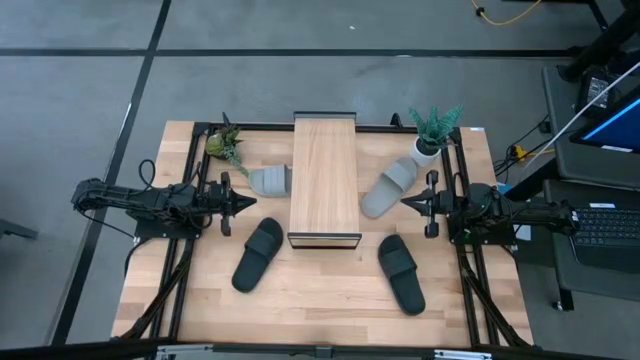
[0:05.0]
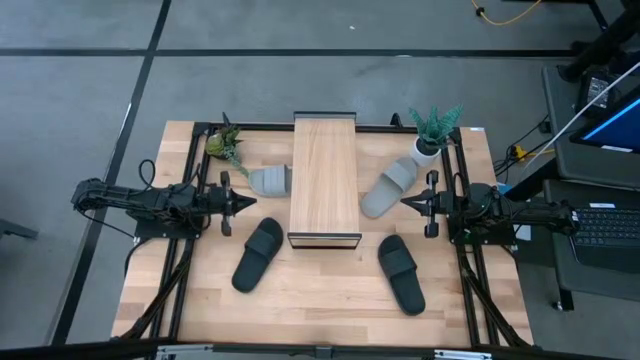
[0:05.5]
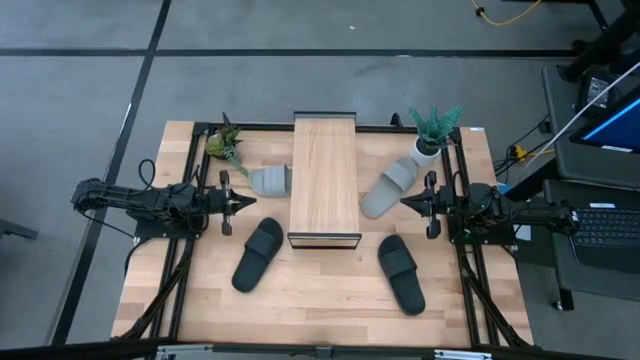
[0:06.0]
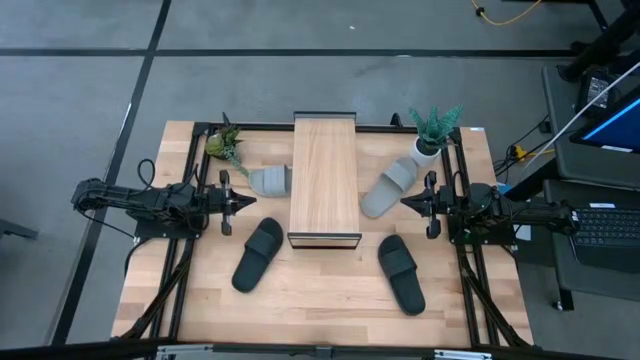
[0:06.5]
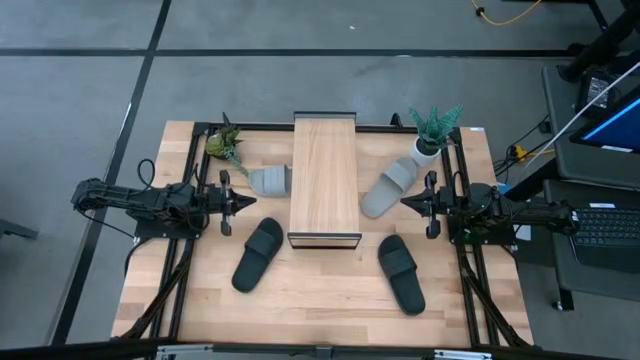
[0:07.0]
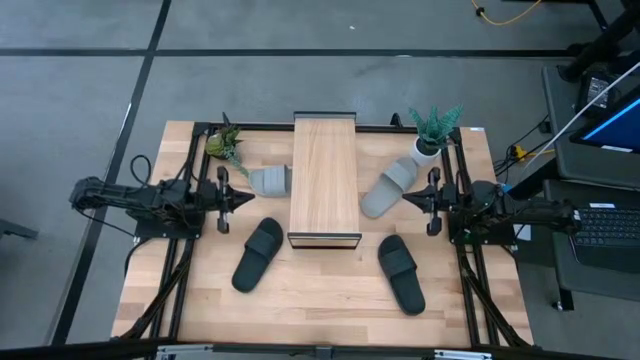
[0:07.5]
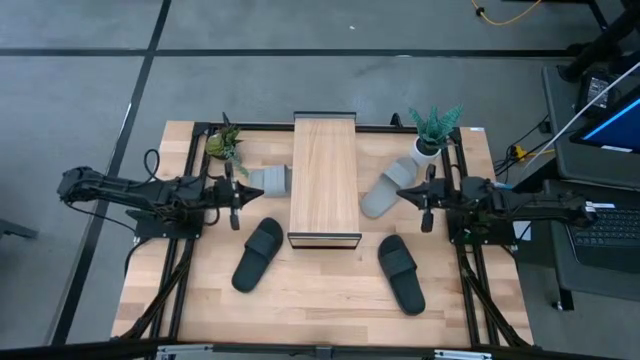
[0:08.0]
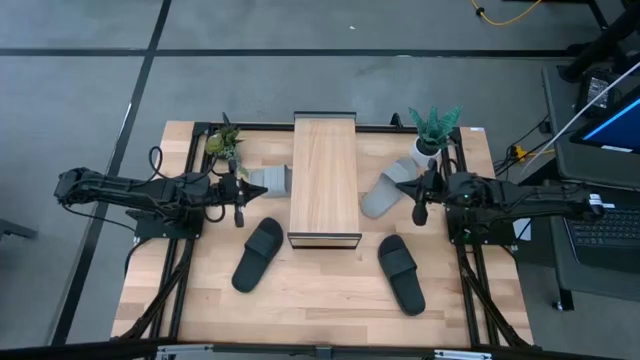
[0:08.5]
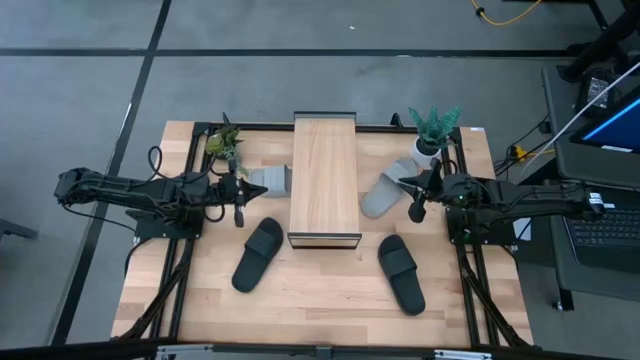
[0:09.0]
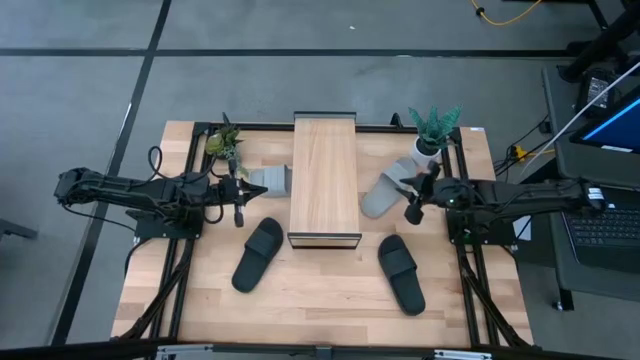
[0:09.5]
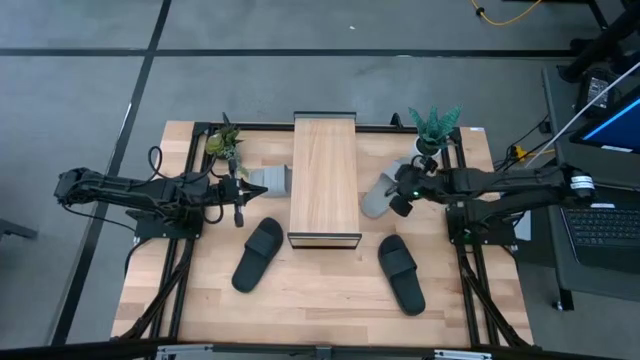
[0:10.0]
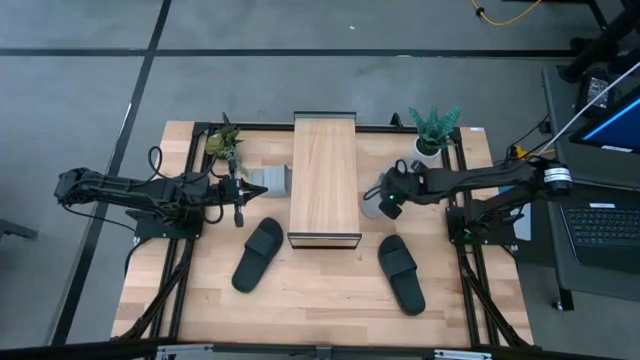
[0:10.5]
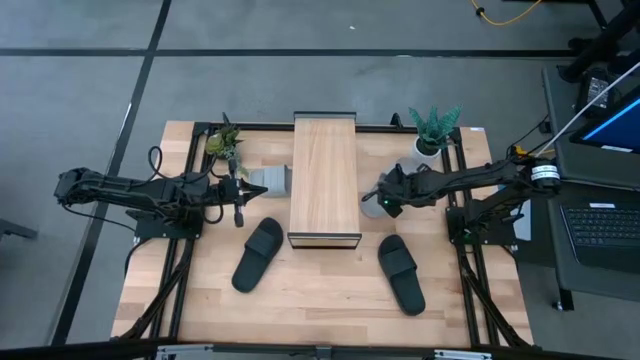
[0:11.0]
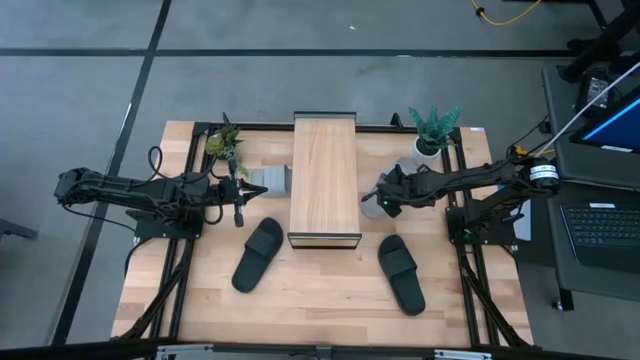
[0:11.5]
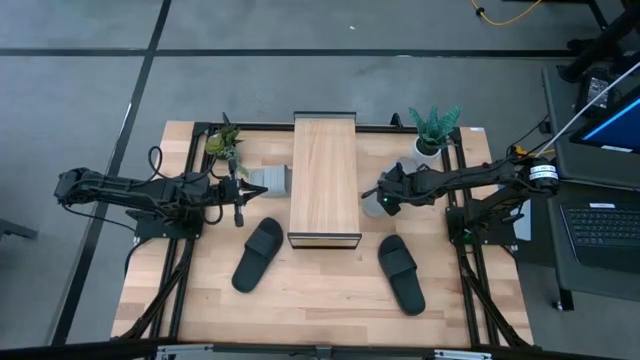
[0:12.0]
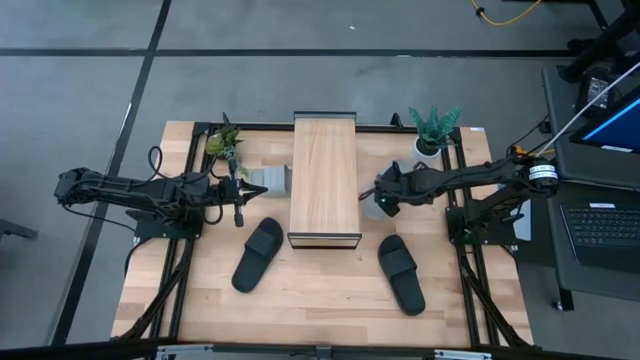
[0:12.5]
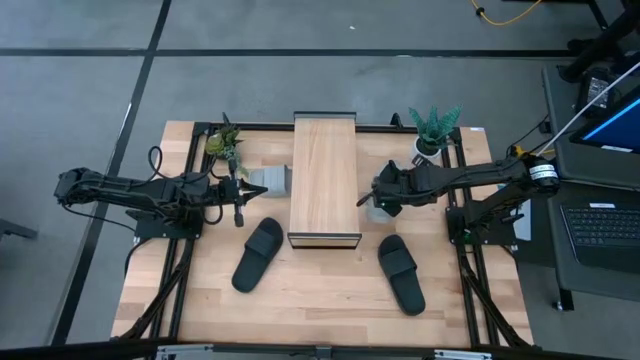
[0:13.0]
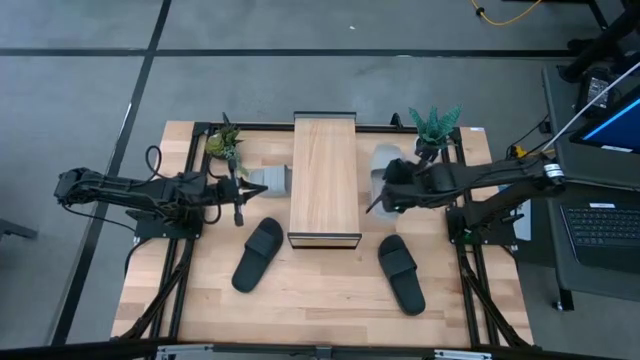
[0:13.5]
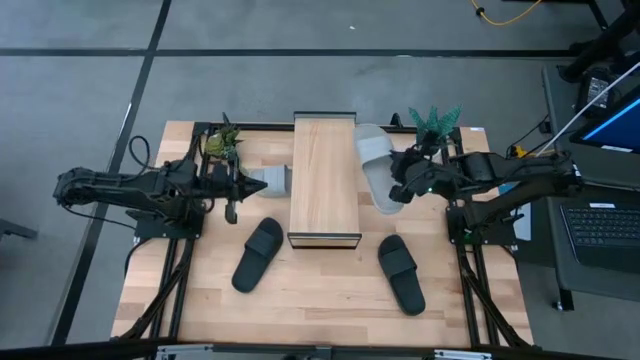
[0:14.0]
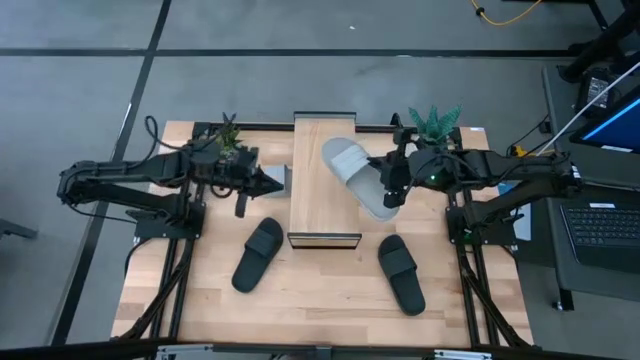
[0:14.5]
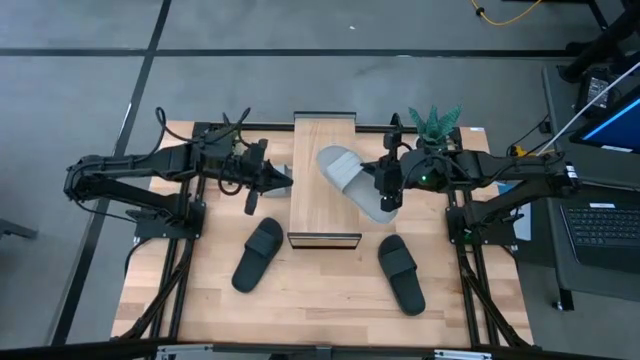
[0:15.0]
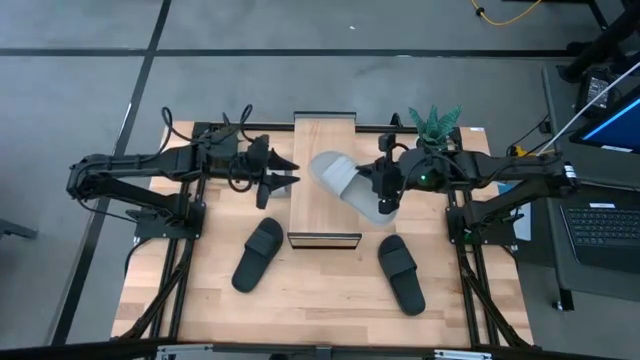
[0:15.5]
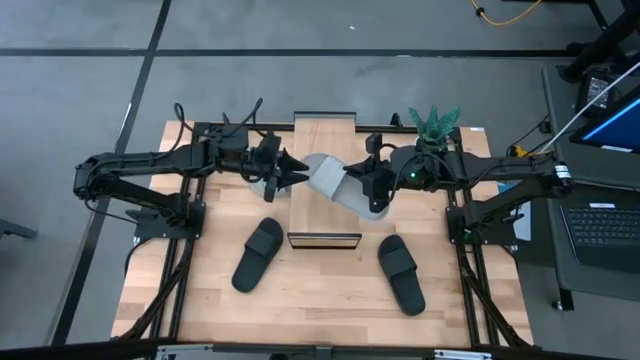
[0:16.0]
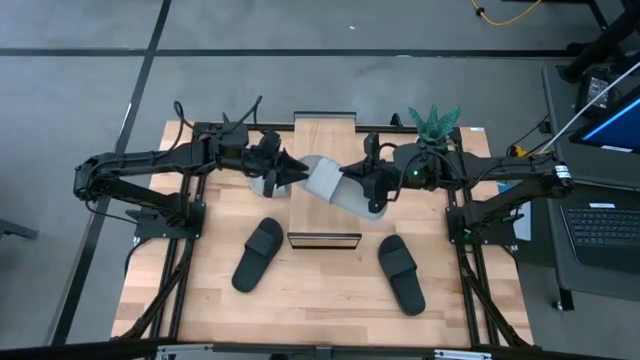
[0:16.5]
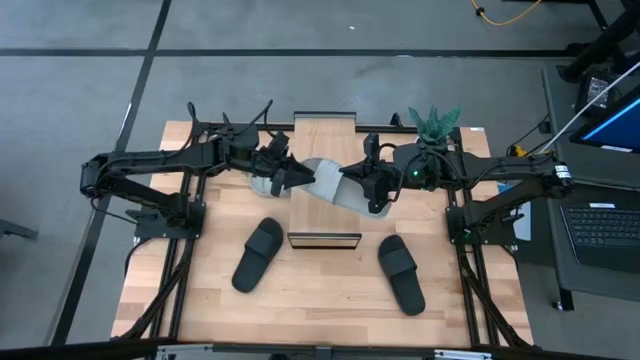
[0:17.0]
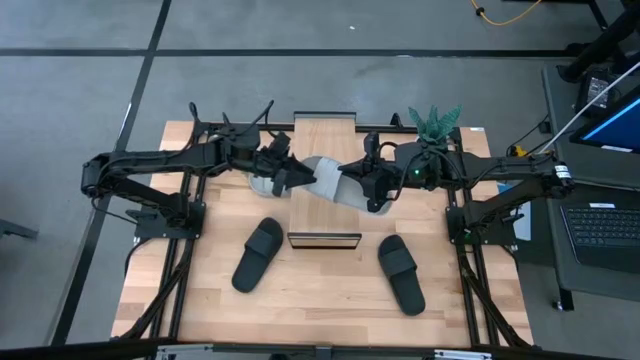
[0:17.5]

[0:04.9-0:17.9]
Task: Pick and place slides into the shelf
Put the right gray slide on the shelf

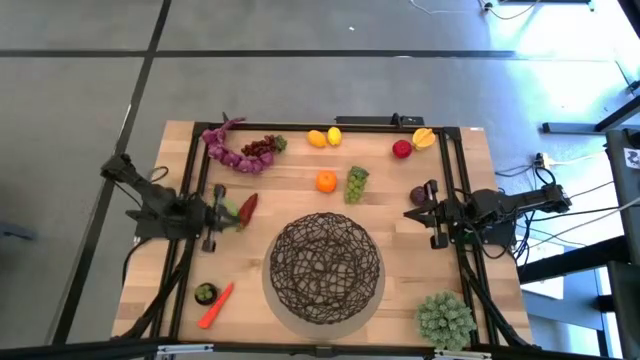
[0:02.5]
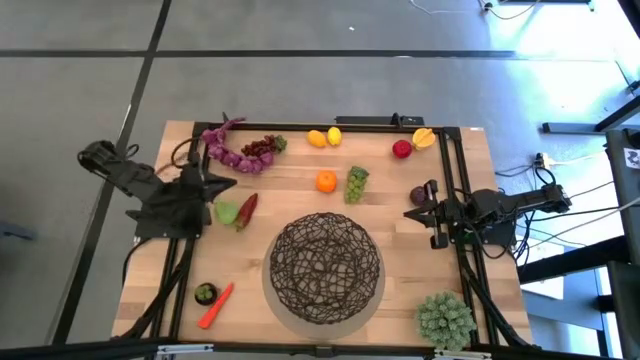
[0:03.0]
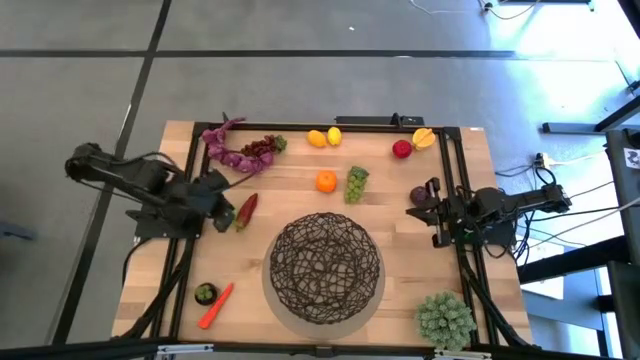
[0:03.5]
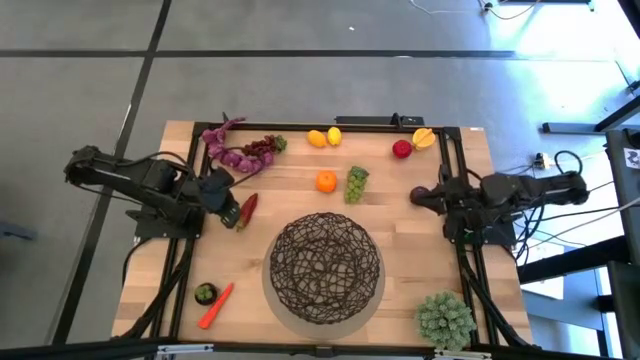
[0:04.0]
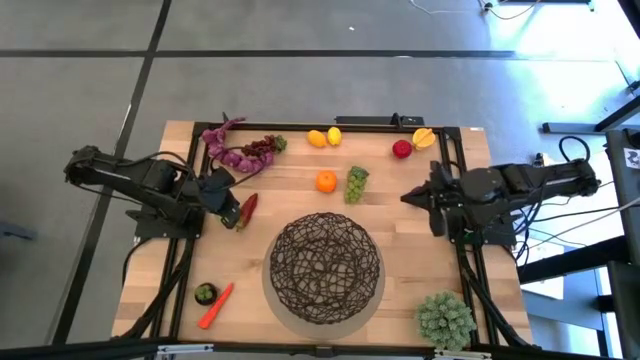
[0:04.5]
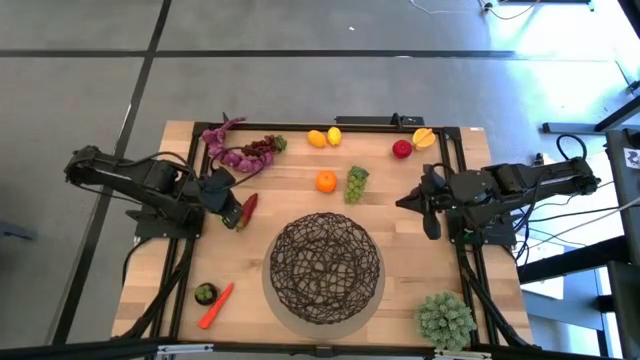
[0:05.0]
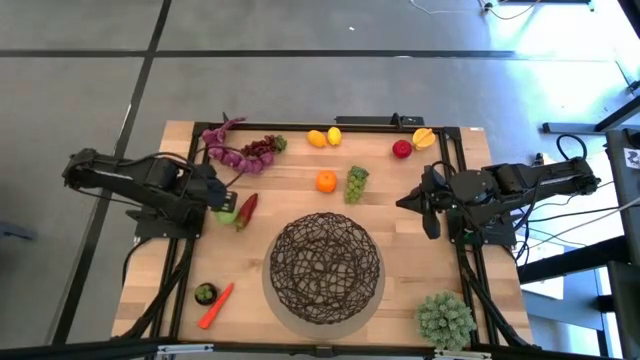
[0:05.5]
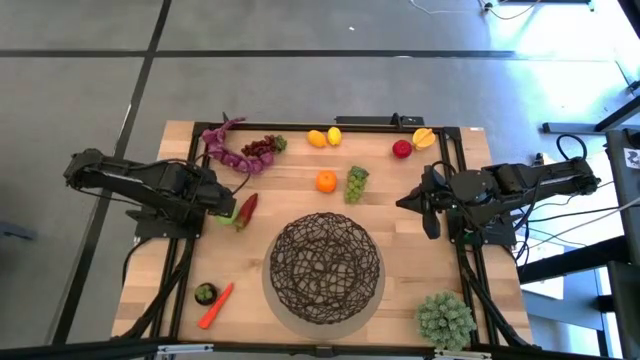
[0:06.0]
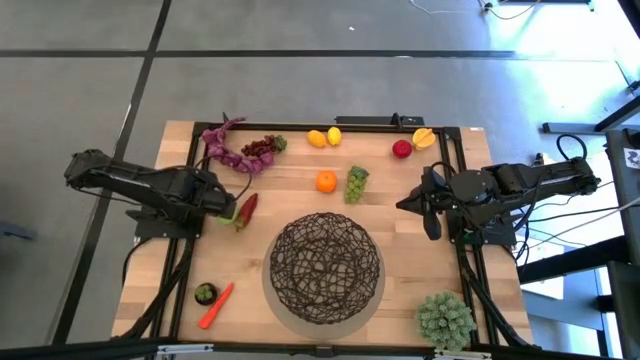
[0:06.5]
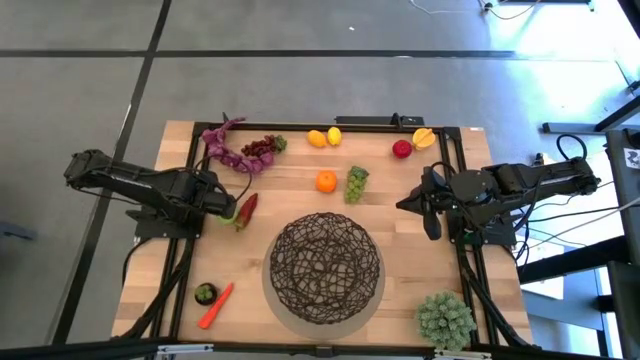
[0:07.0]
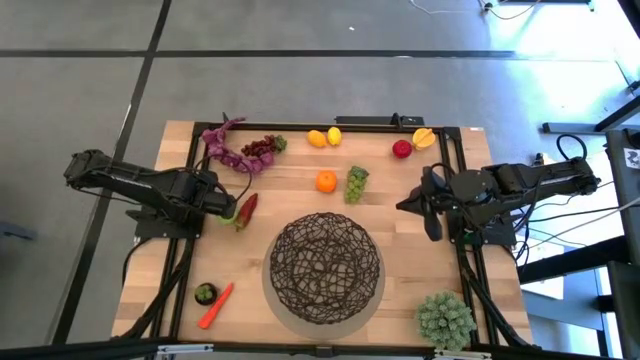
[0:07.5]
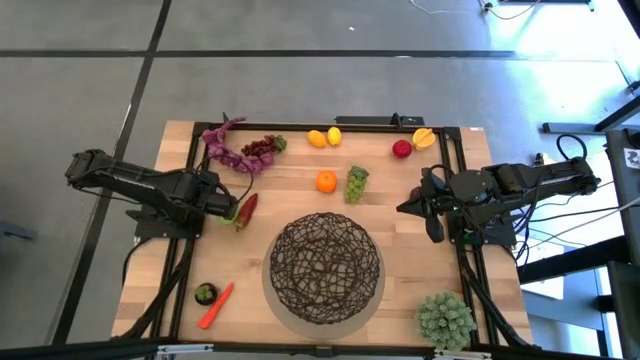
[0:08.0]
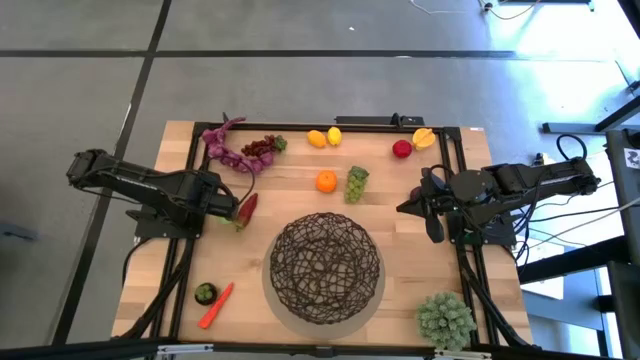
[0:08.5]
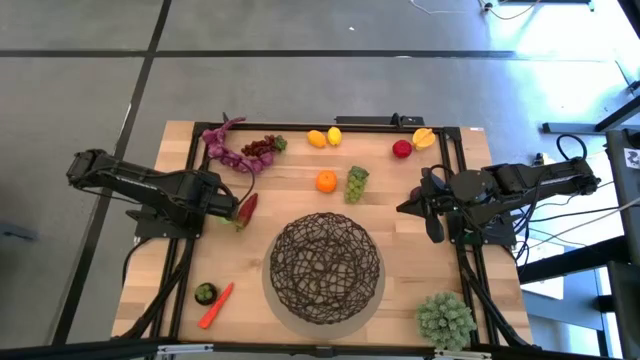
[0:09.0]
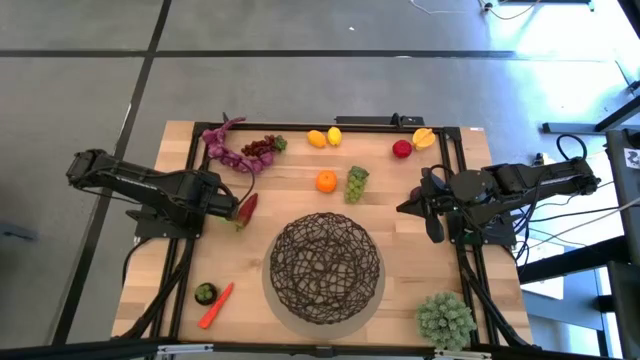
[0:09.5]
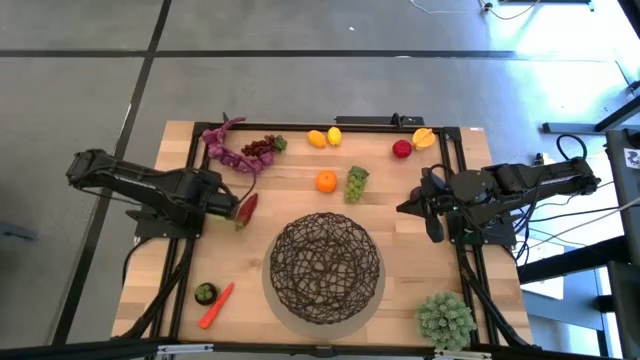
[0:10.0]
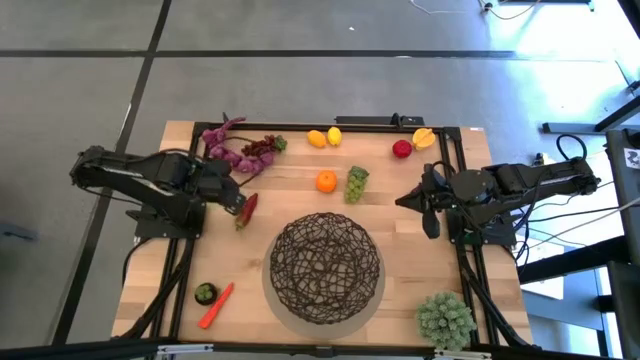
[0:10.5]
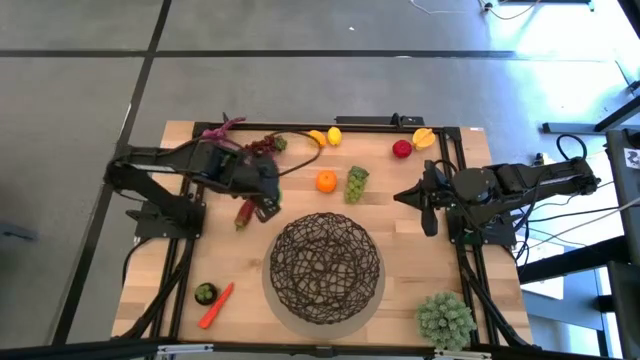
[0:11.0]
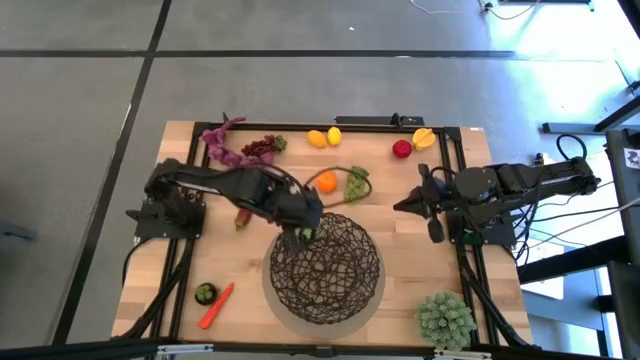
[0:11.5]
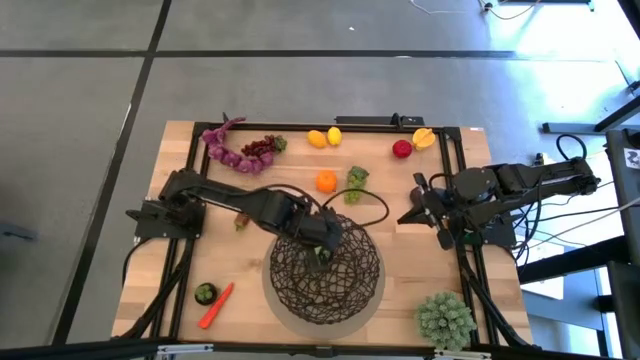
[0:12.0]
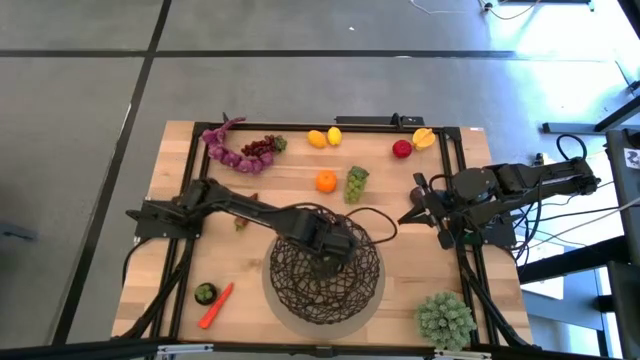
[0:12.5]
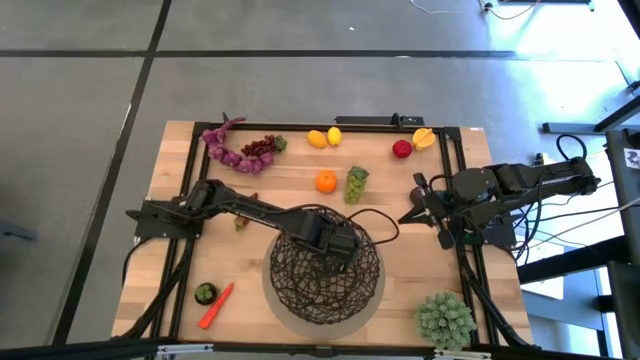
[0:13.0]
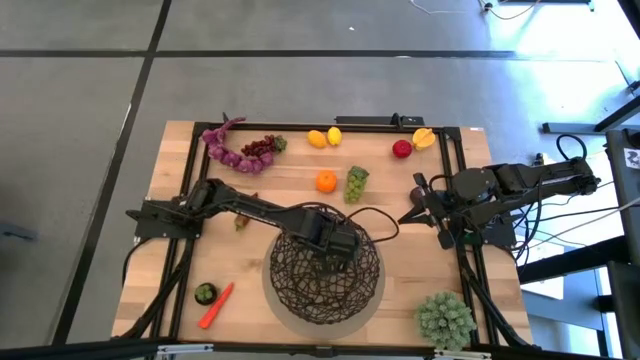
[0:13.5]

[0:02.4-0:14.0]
Task: Build produce basket
Put the pear into the mesh basket
